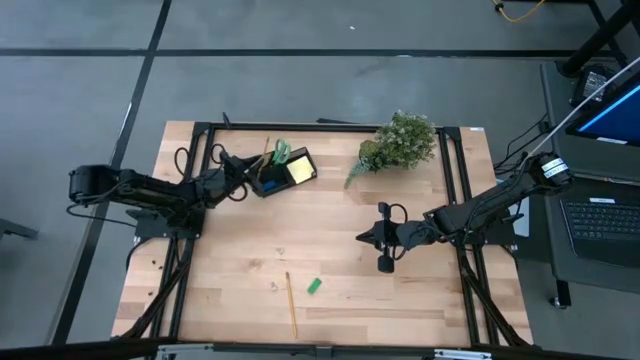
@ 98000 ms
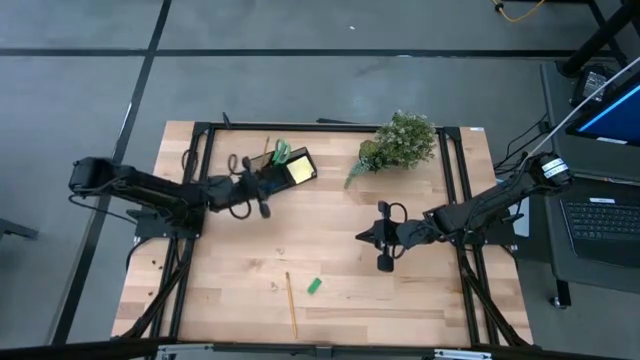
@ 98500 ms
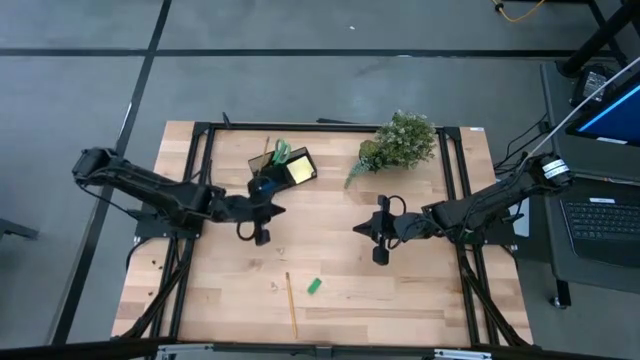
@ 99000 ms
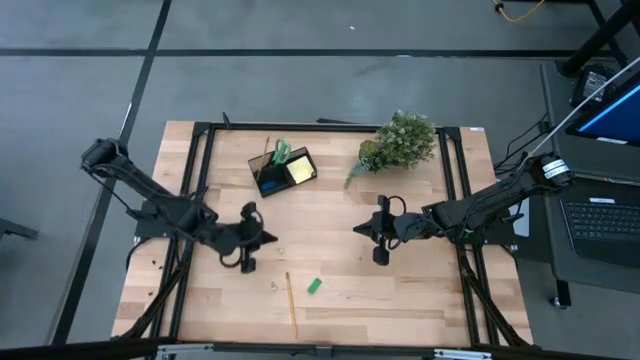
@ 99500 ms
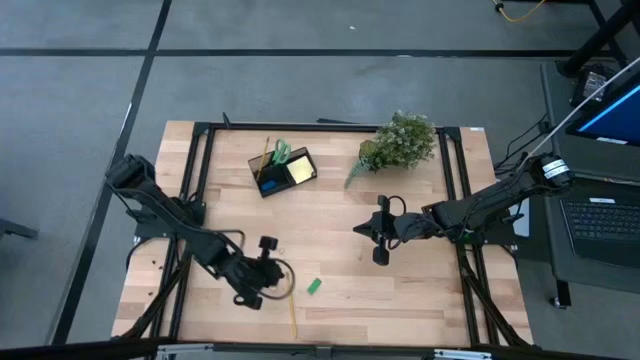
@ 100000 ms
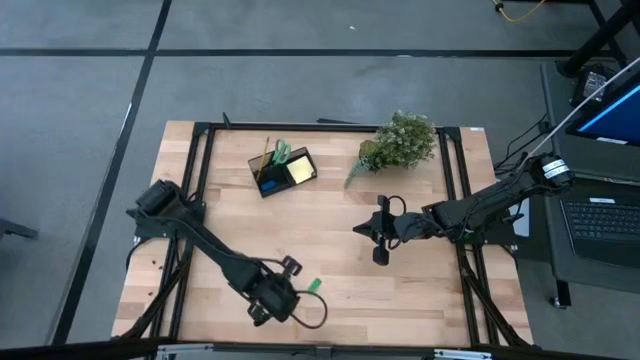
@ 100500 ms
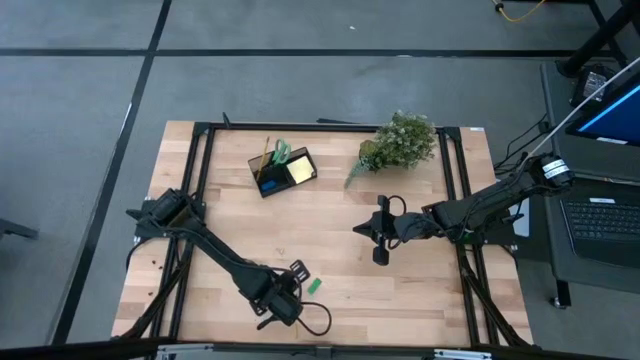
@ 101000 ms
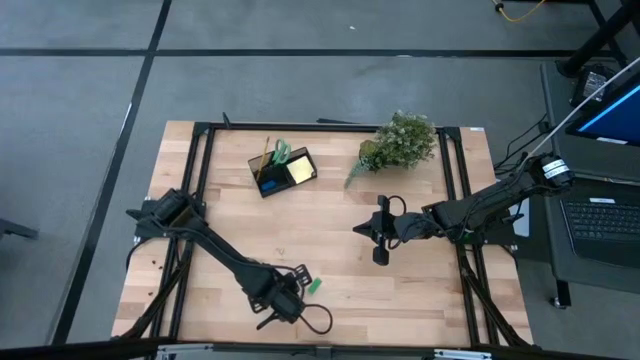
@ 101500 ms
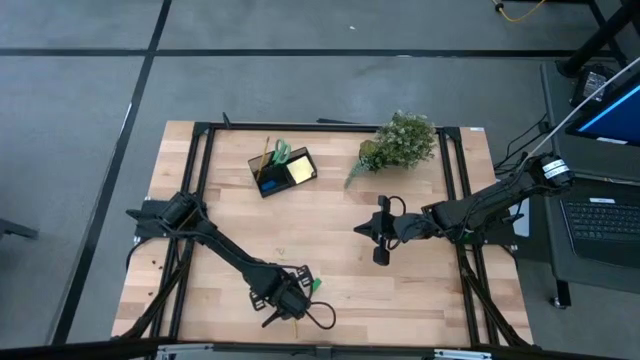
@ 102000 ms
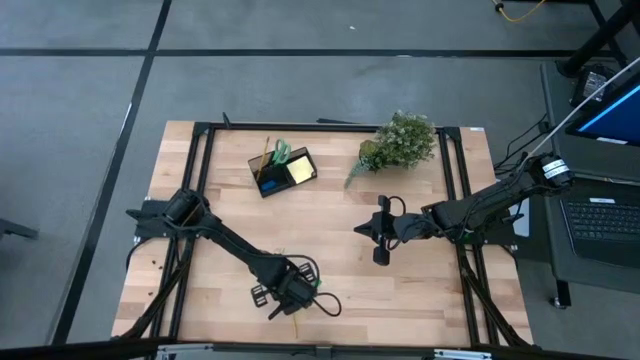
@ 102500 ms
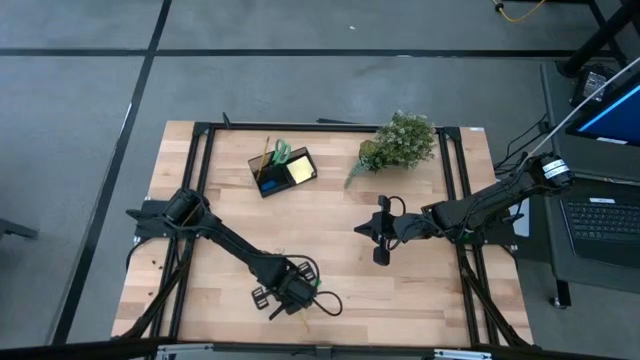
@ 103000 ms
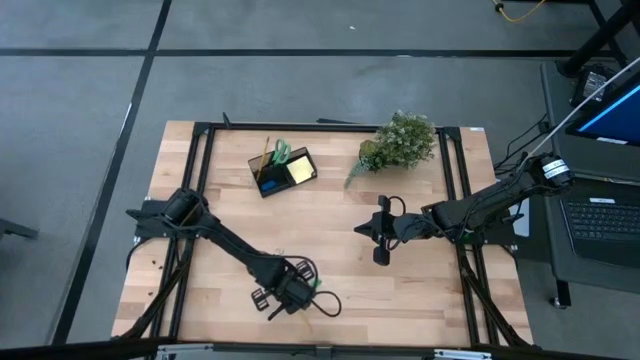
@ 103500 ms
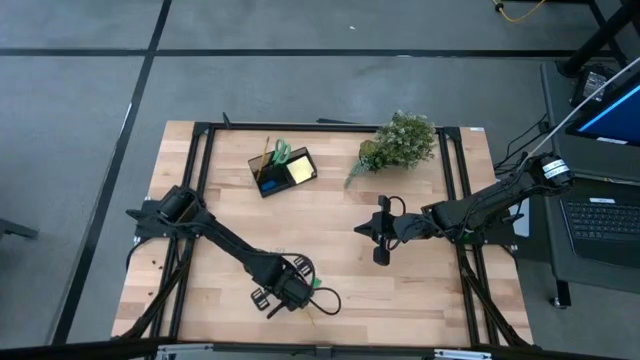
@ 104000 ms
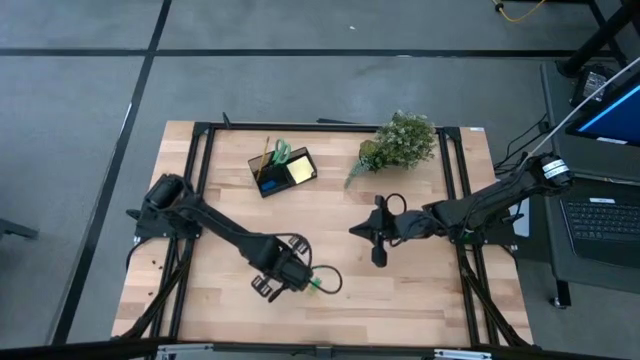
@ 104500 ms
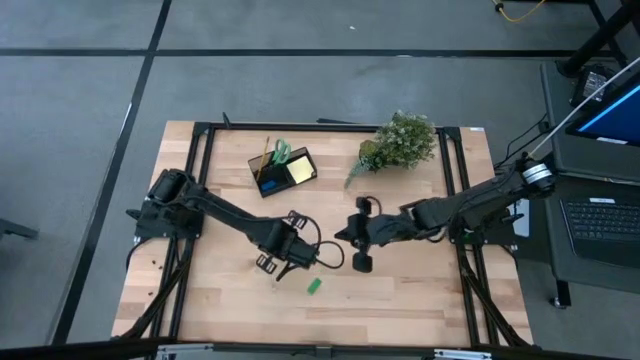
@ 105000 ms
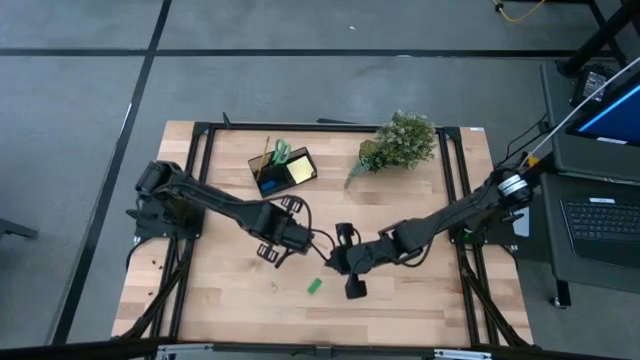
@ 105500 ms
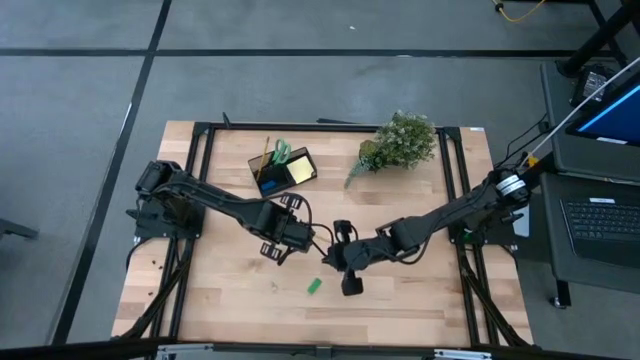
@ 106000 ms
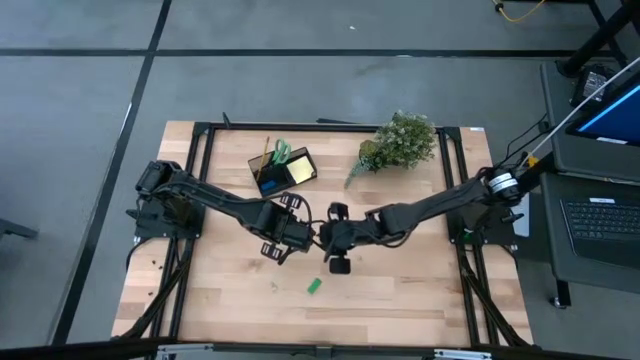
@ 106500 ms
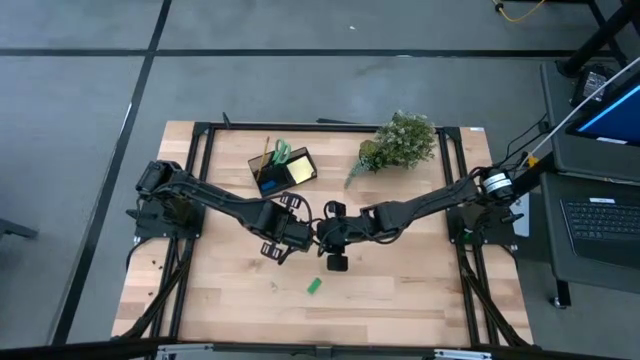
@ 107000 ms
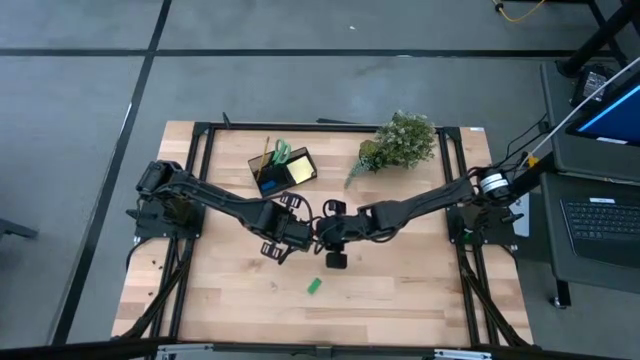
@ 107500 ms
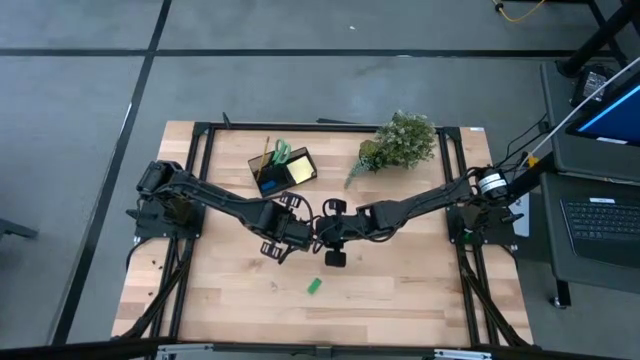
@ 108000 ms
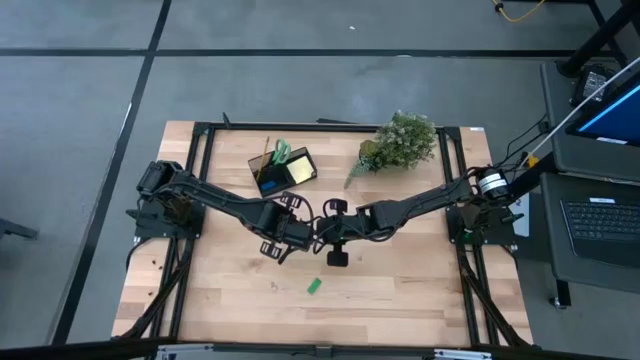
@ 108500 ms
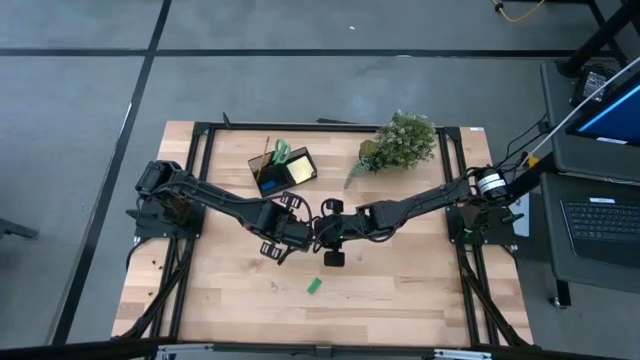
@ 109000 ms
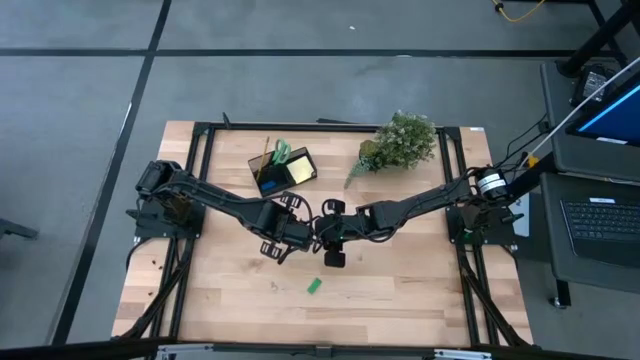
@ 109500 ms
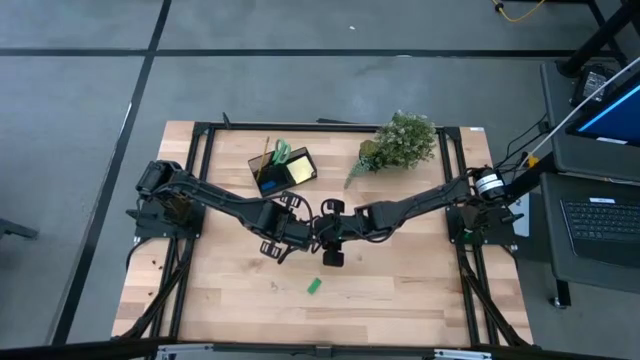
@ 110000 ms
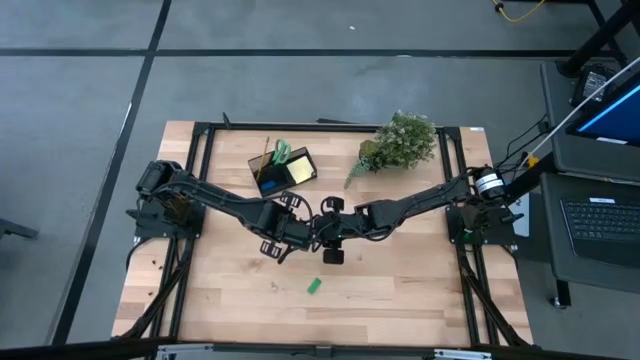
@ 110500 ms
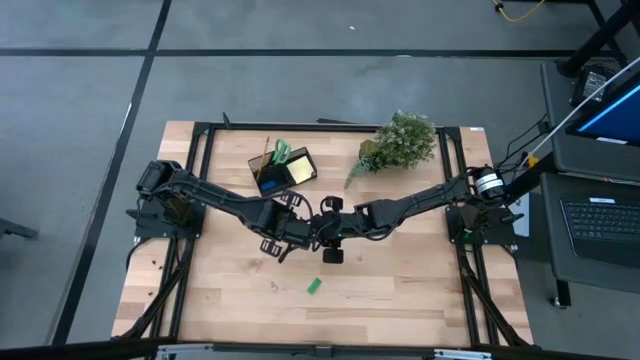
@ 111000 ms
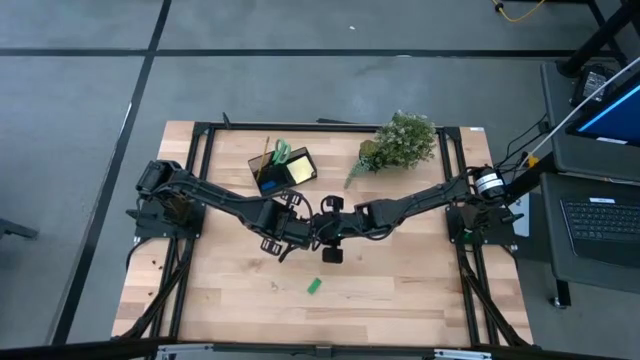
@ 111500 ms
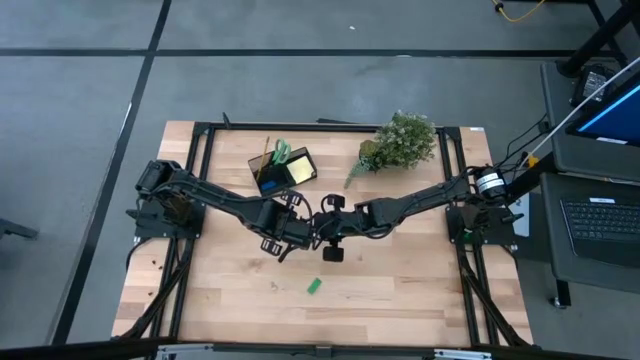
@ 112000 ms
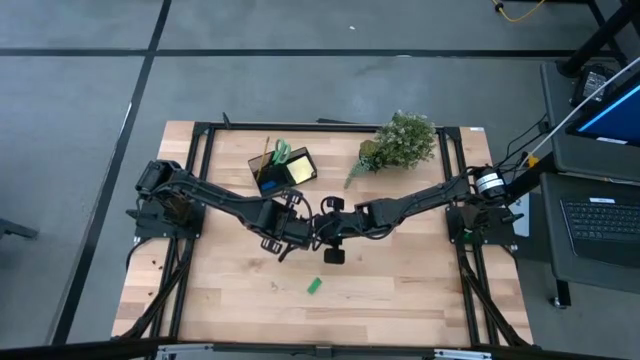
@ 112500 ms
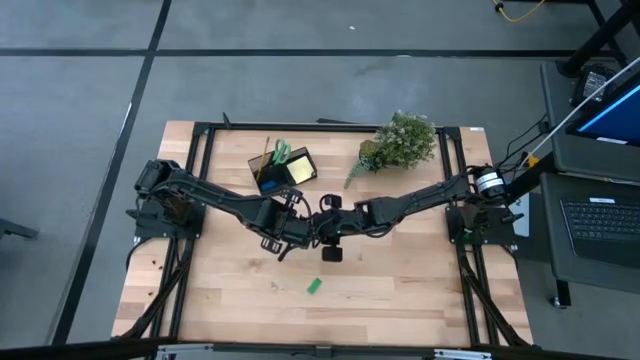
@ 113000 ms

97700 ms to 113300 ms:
Task: Pick and place office supplies into organizer
Put the yellow pencil into the desk organizer

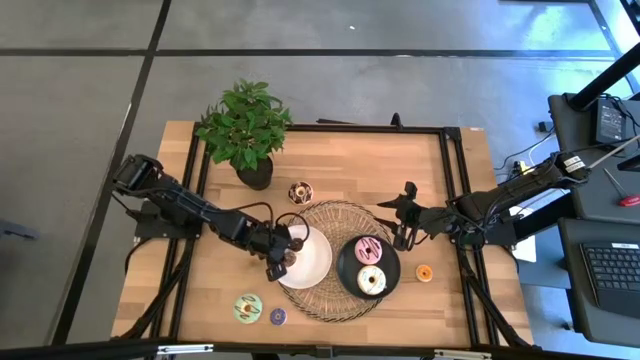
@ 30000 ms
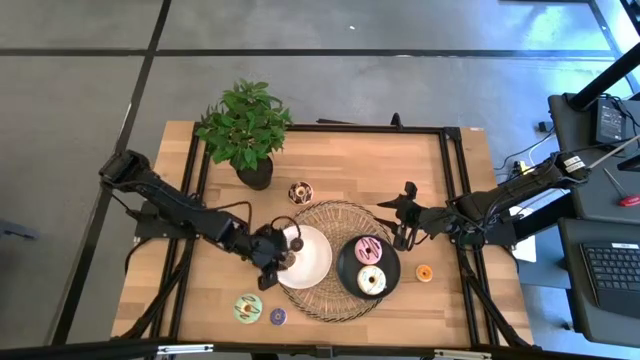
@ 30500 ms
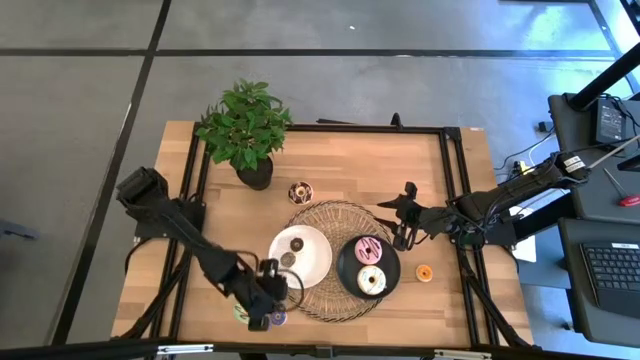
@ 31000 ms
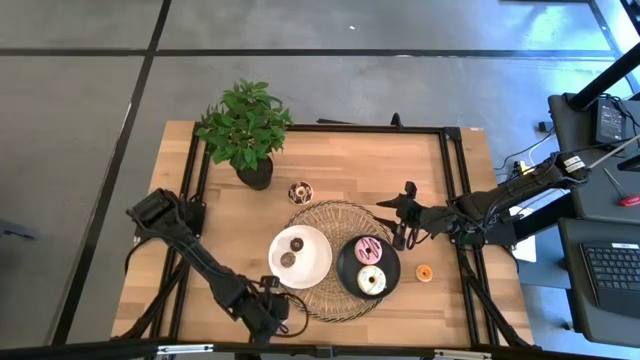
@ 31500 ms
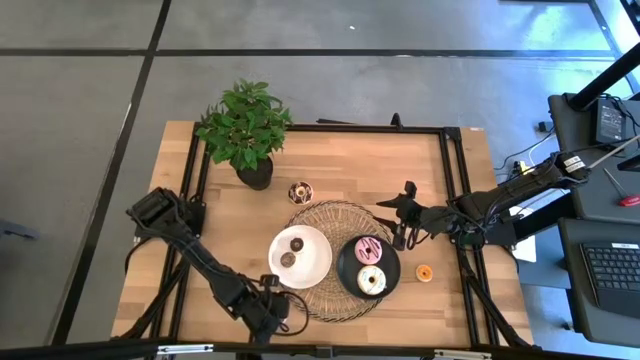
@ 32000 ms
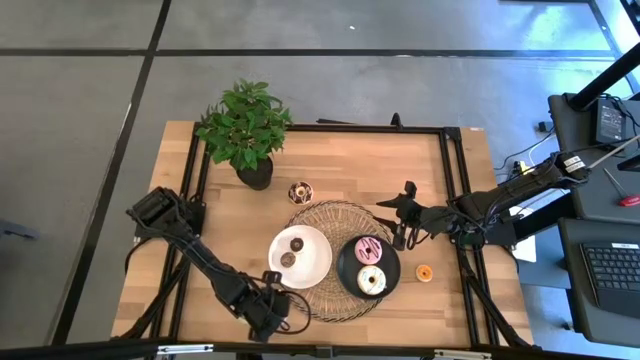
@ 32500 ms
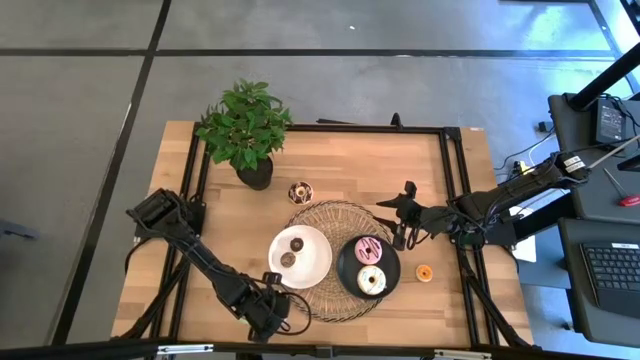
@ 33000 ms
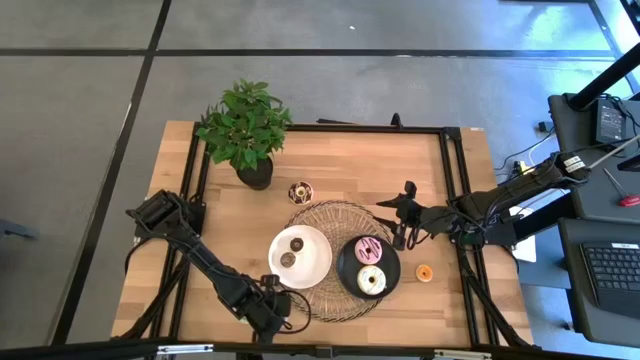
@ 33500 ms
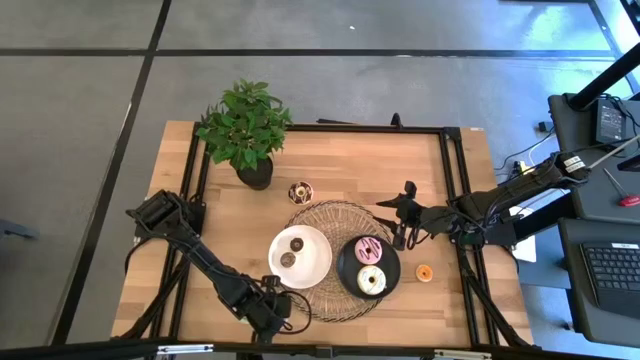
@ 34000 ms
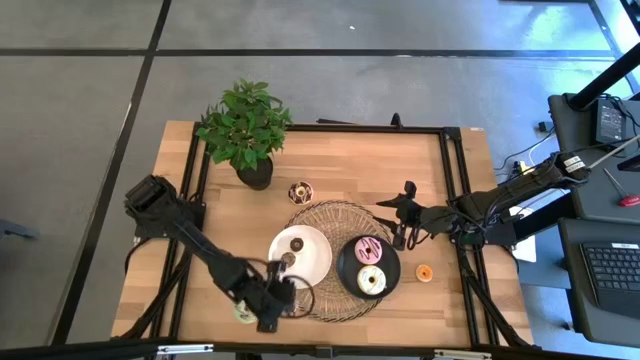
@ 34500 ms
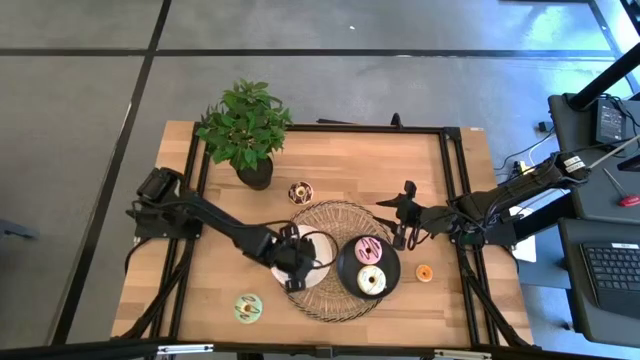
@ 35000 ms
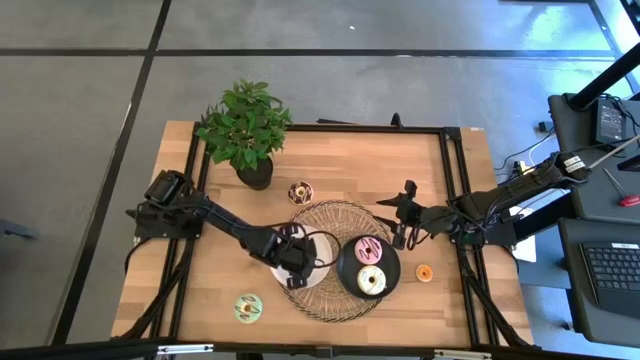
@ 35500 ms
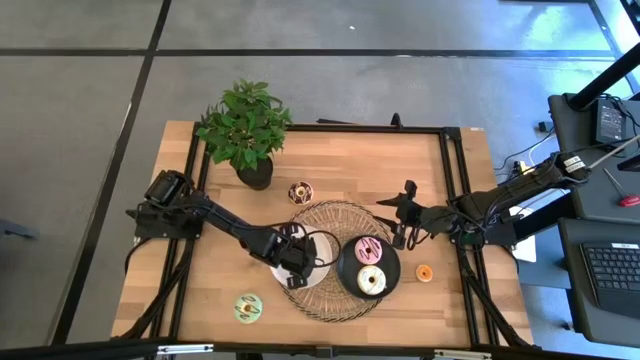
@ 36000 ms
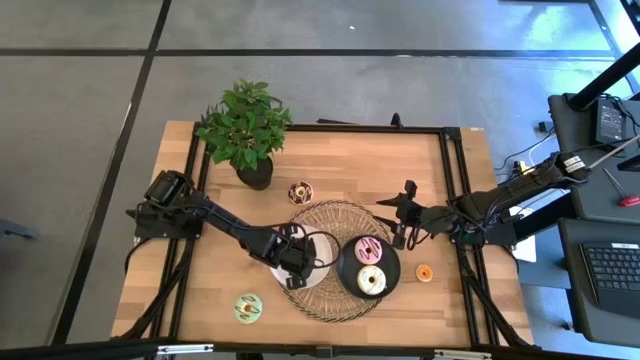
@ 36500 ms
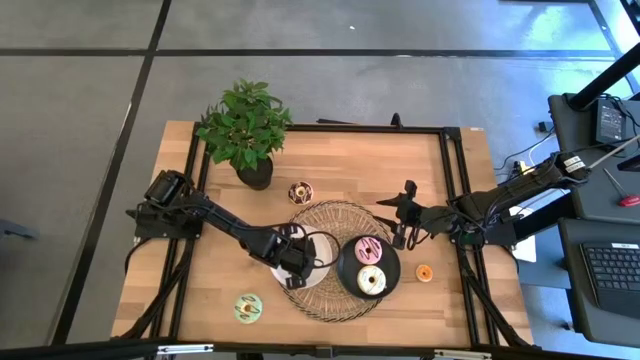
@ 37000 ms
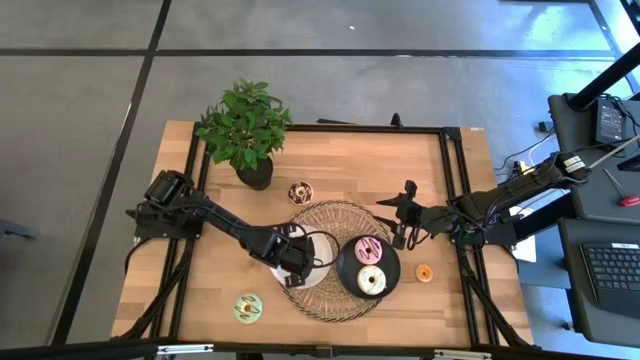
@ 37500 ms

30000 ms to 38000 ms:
Task: Pick & Place donuts
Put the small blue donut on the white plate
